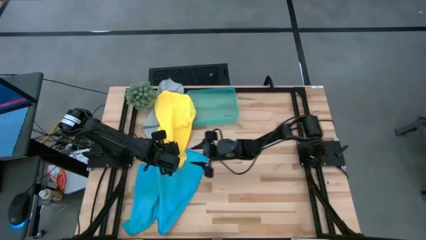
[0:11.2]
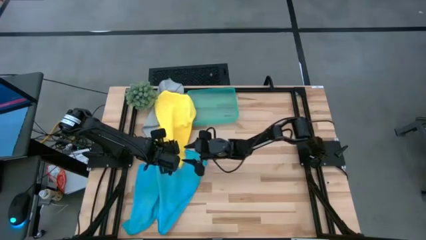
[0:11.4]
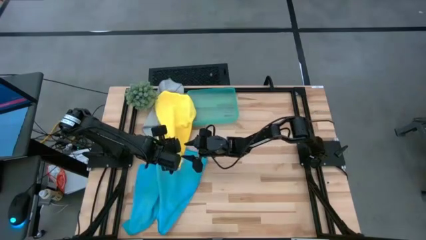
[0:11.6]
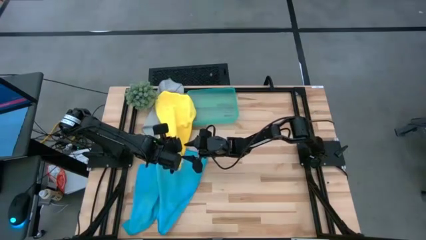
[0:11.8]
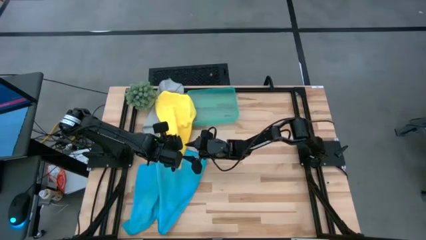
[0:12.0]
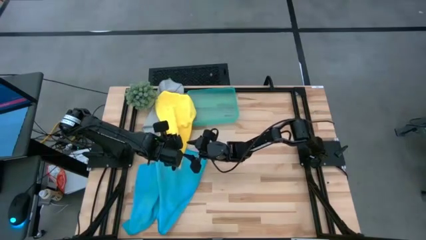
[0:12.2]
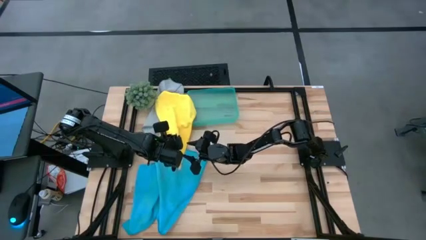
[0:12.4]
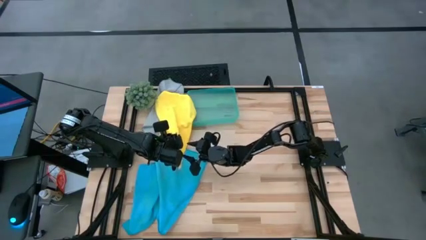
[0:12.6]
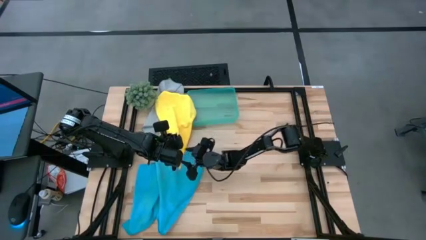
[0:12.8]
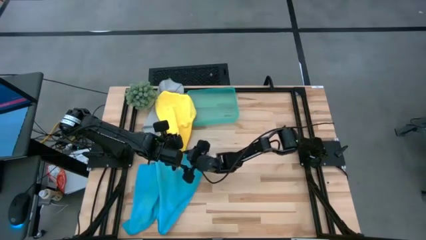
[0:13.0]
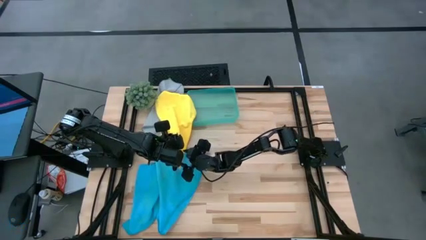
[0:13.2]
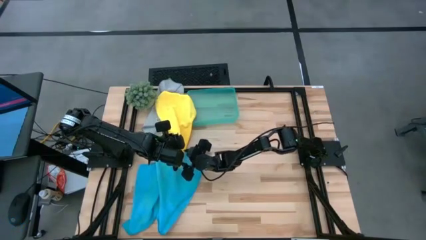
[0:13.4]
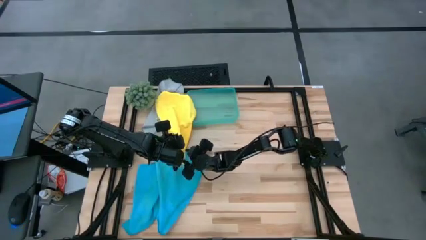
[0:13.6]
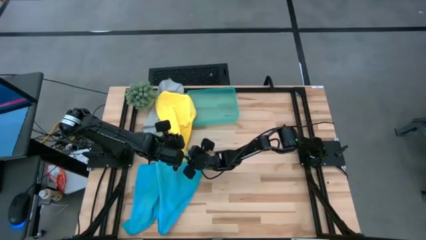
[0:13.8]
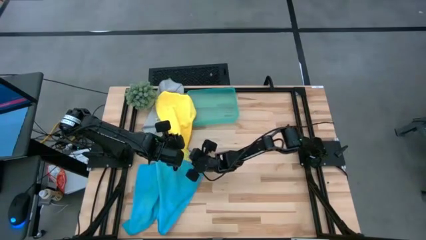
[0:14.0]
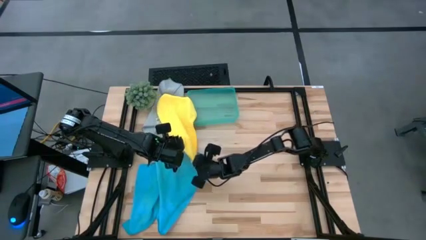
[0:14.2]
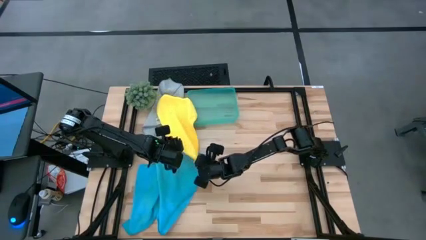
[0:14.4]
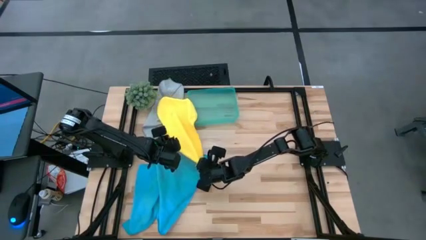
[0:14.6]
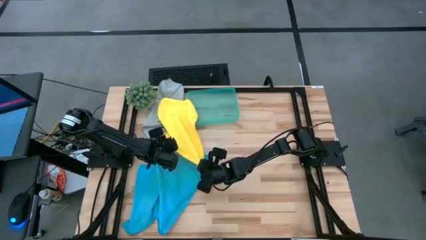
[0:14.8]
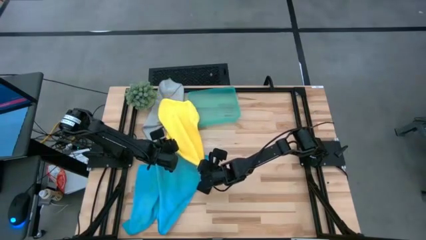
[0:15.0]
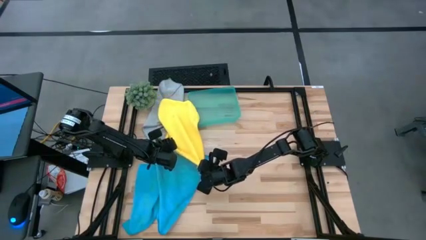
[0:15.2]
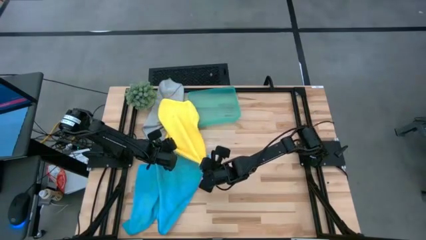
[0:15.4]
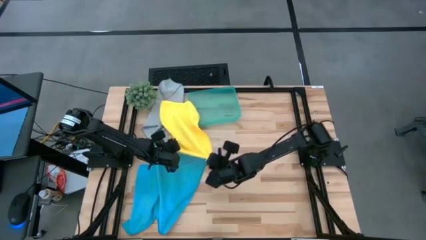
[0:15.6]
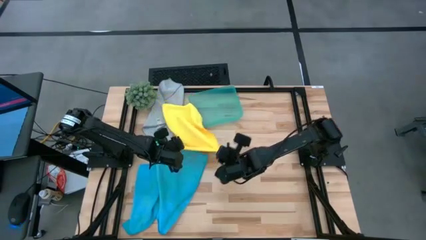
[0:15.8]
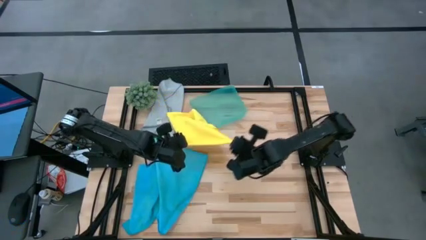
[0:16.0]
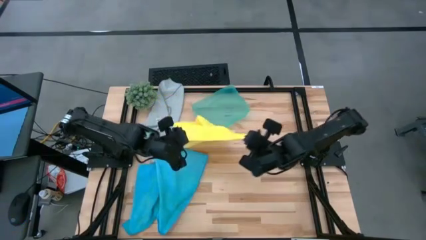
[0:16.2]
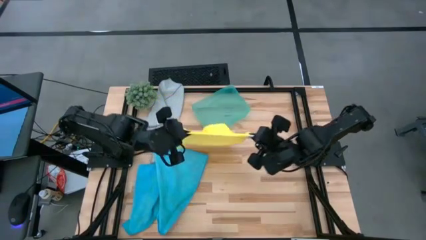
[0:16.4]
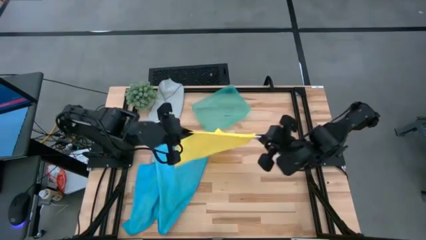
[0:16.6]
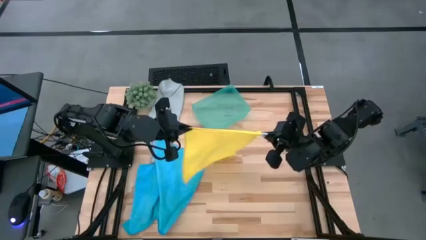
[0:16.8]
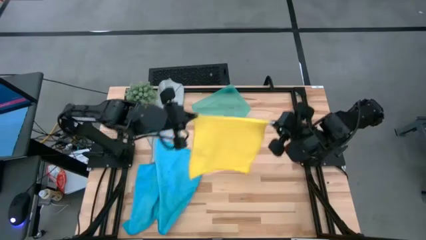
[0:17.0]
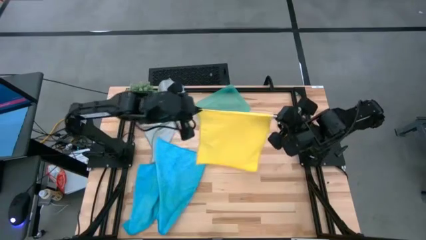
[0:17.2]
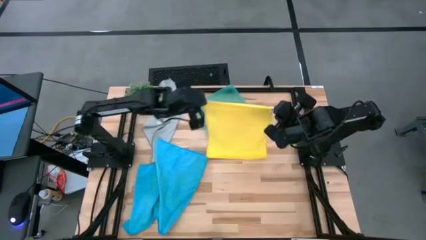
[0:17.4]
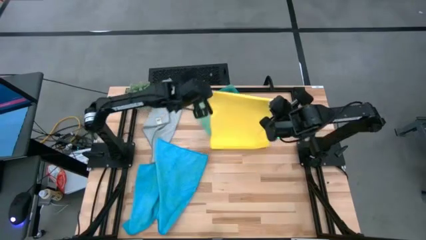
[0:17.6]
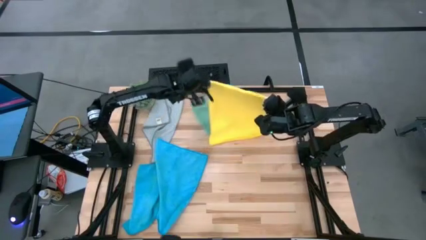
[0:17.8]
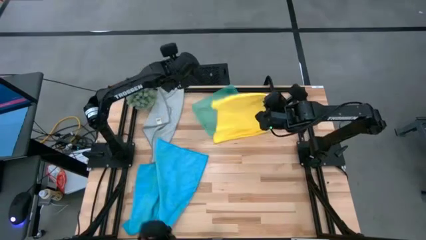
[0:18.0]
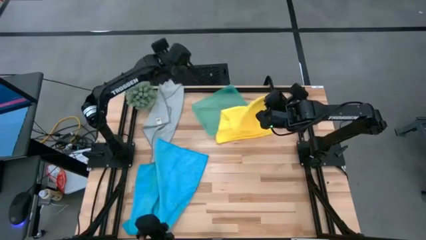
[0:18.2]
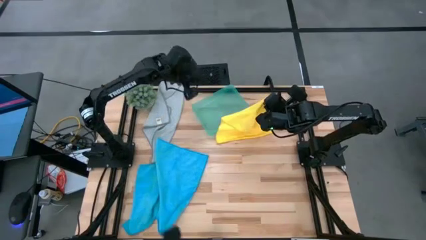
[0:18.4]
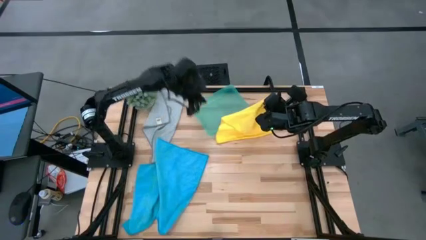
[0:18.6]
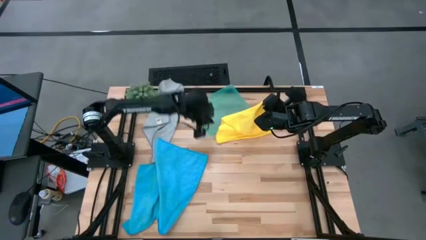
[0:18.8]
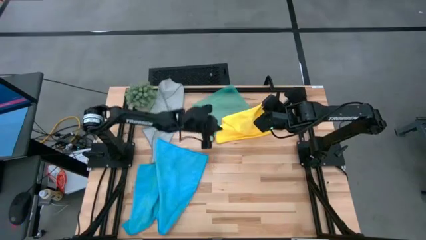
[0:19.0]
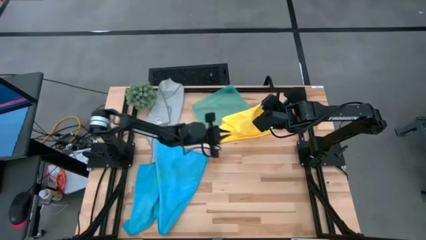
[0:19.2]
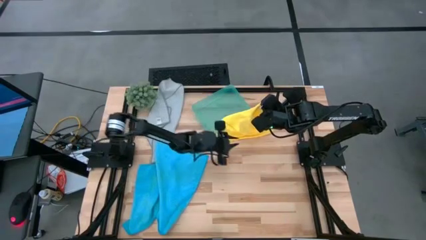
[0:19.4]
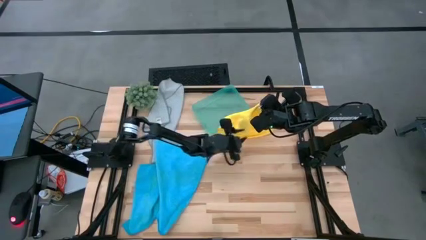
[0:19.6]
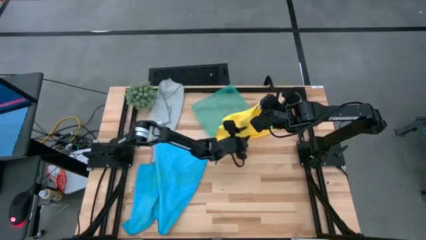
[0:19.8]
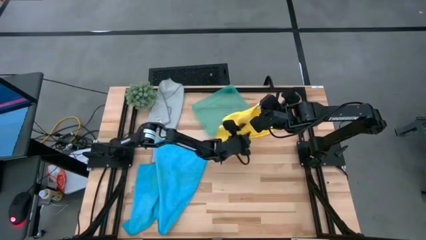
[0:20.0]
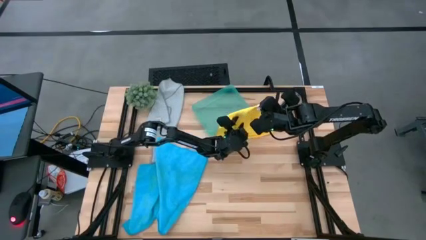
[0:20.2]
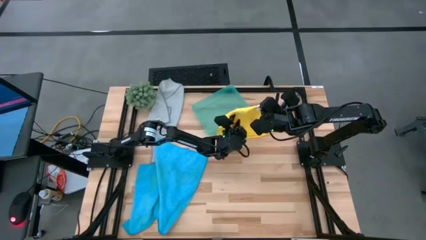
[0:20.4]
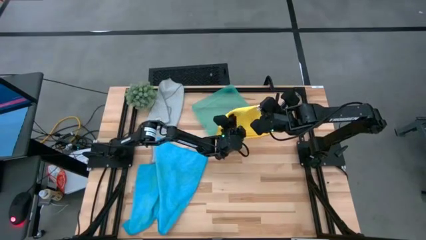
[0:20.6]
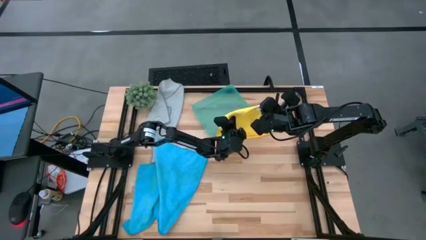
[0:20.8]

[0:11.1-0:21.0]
Task: Fold microfiber towels
Fold the yellow microfiber towel
